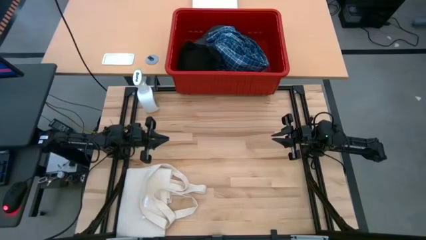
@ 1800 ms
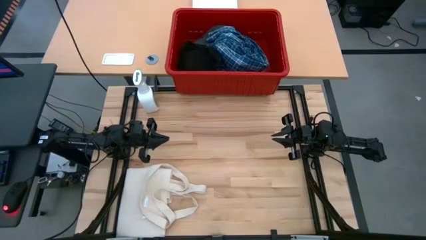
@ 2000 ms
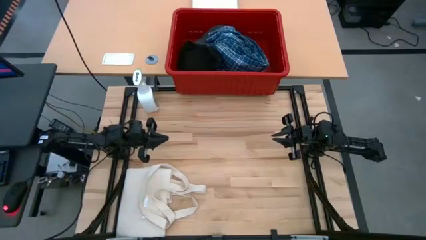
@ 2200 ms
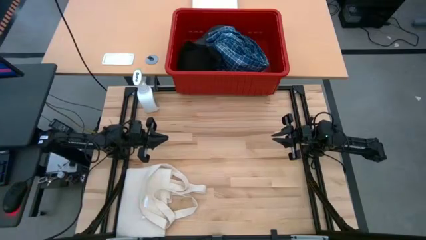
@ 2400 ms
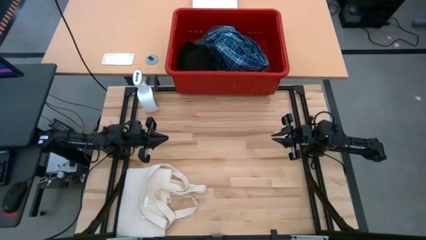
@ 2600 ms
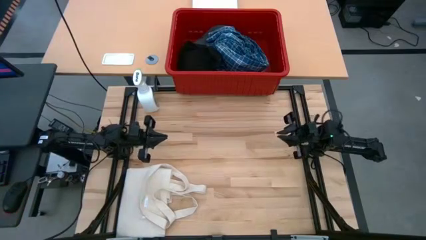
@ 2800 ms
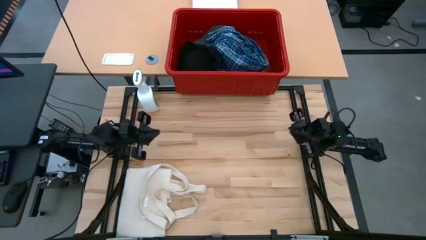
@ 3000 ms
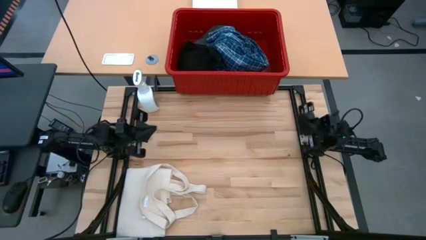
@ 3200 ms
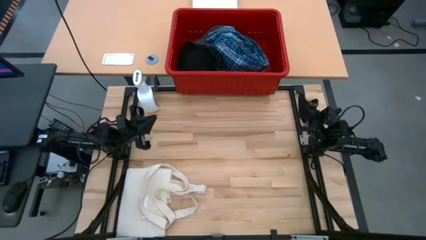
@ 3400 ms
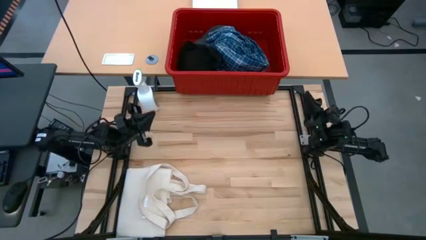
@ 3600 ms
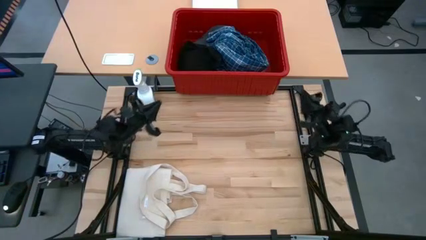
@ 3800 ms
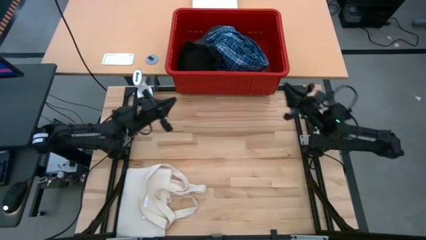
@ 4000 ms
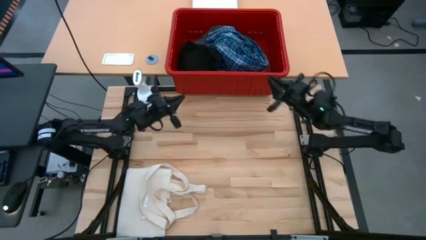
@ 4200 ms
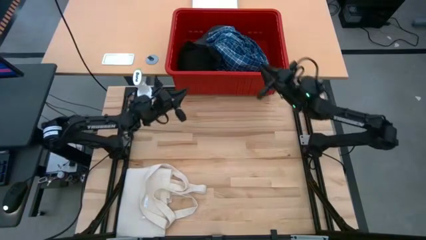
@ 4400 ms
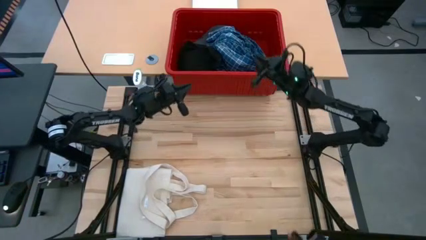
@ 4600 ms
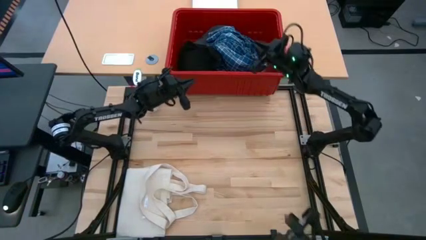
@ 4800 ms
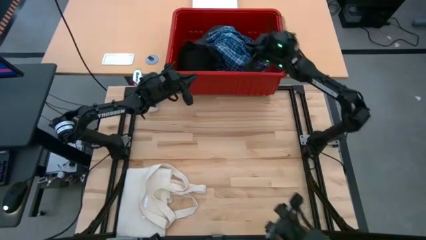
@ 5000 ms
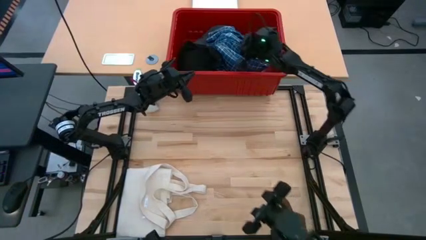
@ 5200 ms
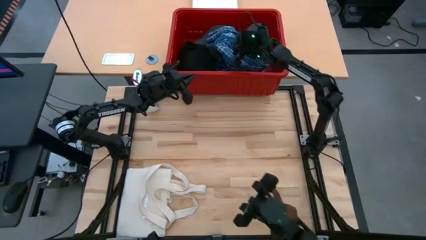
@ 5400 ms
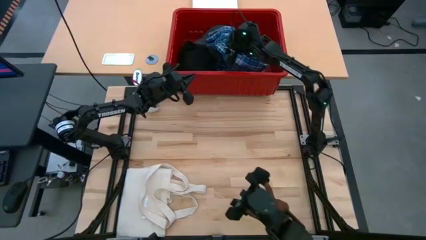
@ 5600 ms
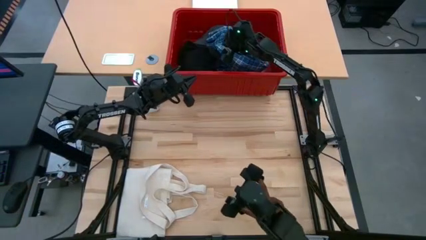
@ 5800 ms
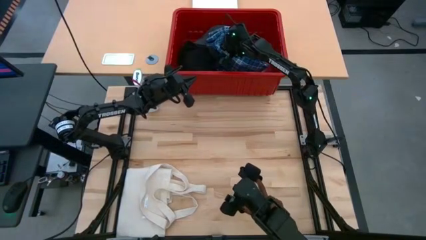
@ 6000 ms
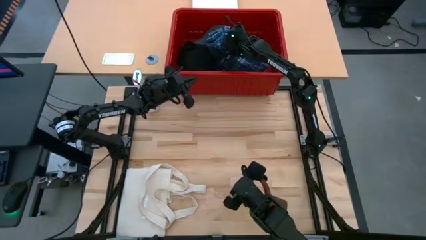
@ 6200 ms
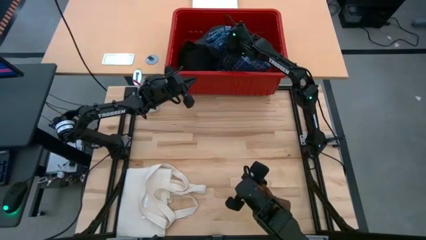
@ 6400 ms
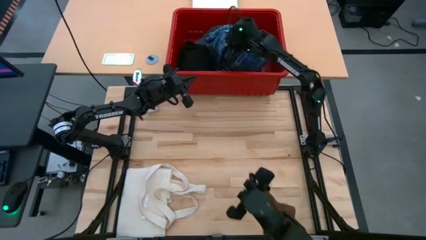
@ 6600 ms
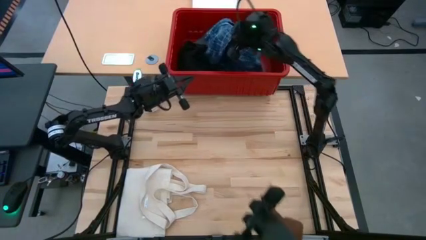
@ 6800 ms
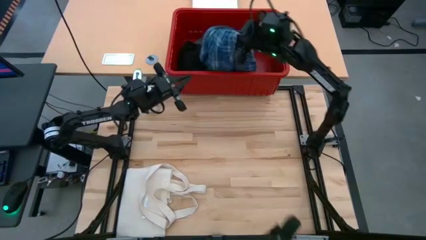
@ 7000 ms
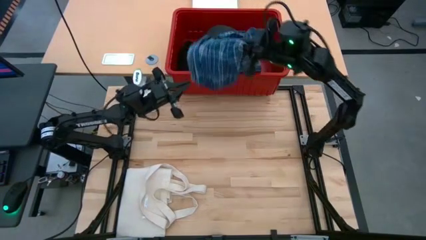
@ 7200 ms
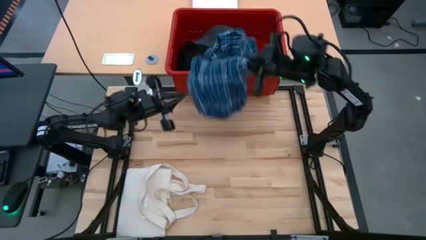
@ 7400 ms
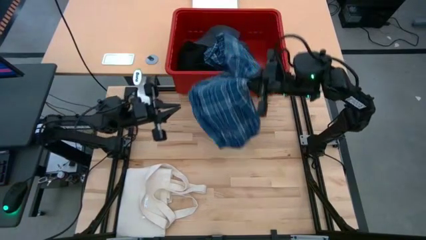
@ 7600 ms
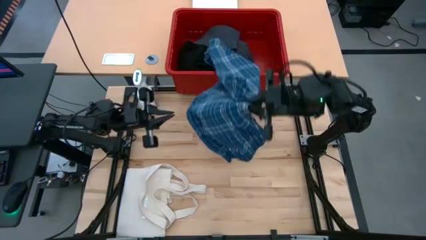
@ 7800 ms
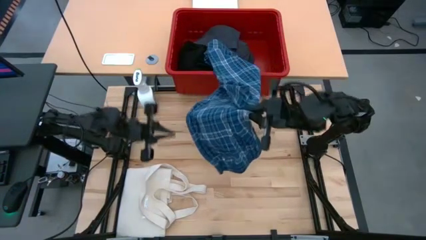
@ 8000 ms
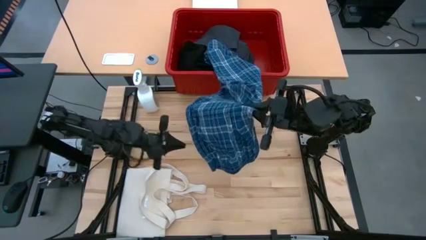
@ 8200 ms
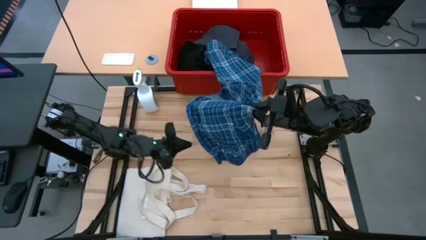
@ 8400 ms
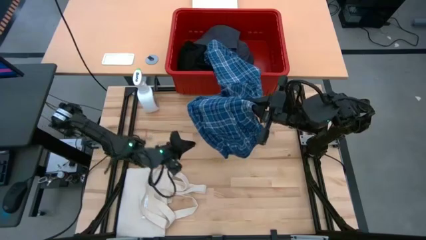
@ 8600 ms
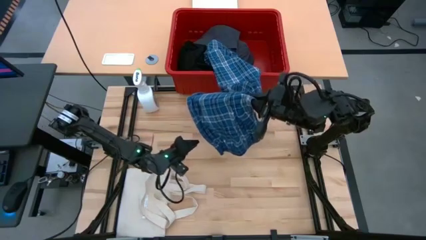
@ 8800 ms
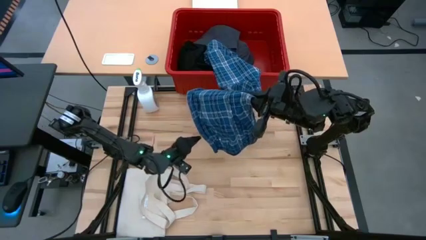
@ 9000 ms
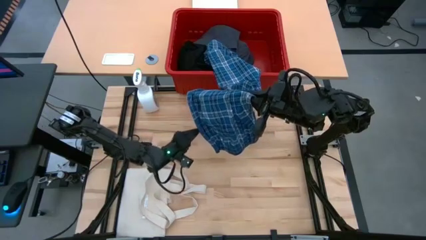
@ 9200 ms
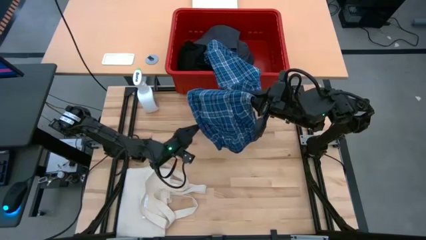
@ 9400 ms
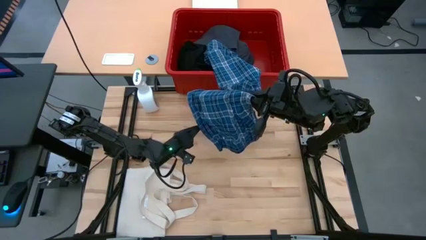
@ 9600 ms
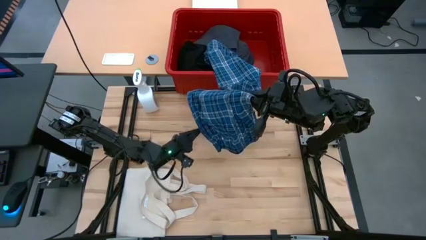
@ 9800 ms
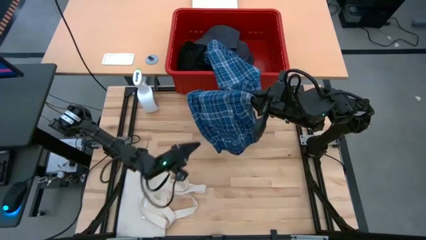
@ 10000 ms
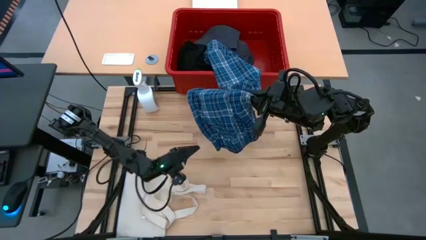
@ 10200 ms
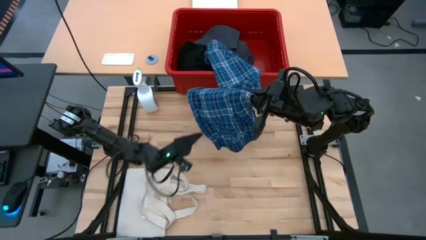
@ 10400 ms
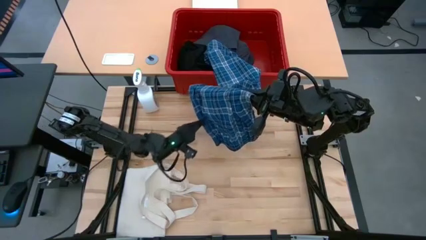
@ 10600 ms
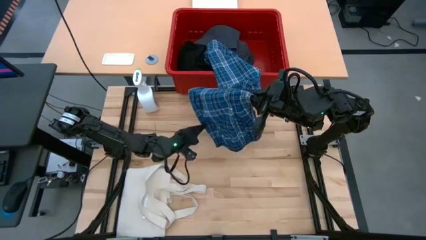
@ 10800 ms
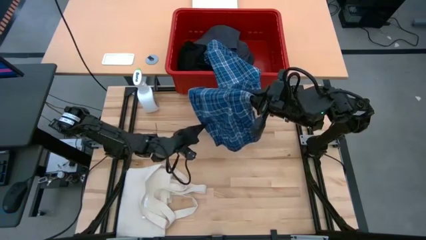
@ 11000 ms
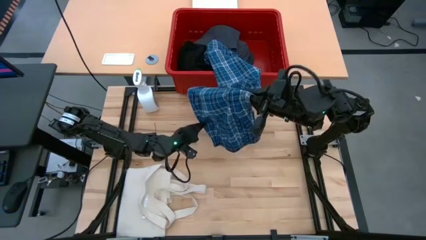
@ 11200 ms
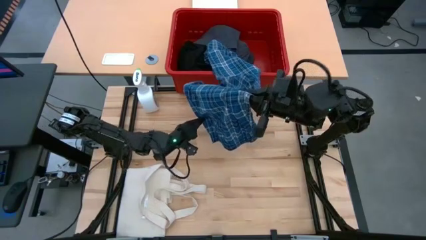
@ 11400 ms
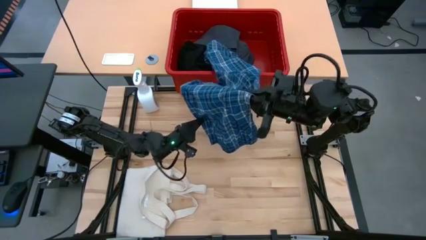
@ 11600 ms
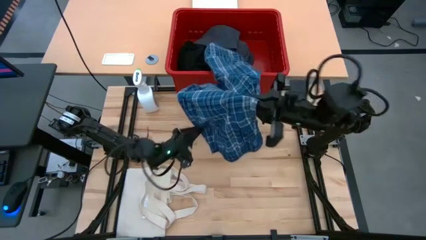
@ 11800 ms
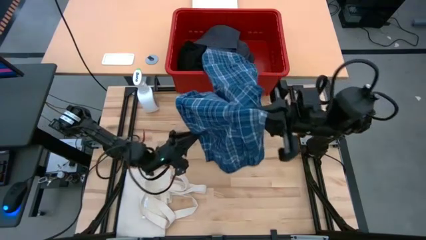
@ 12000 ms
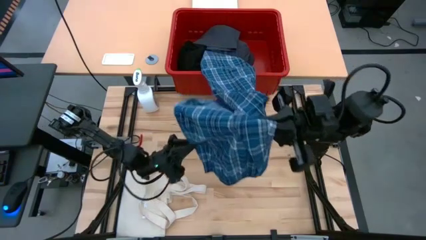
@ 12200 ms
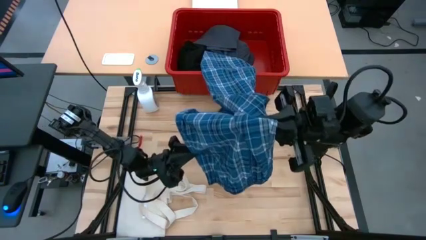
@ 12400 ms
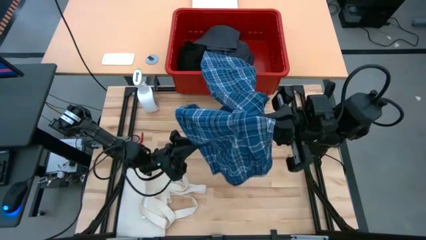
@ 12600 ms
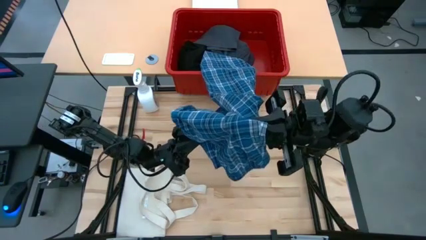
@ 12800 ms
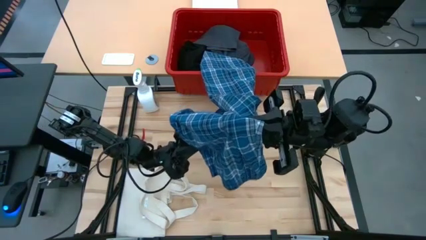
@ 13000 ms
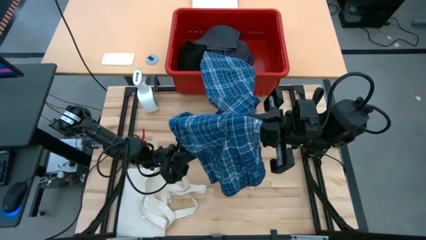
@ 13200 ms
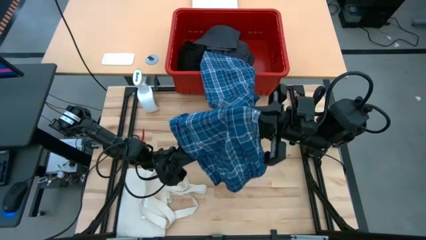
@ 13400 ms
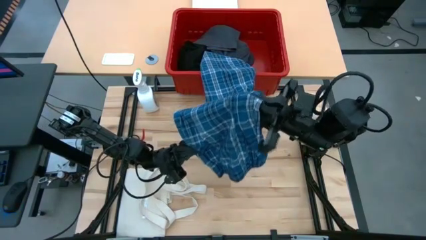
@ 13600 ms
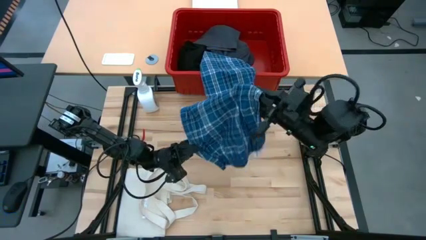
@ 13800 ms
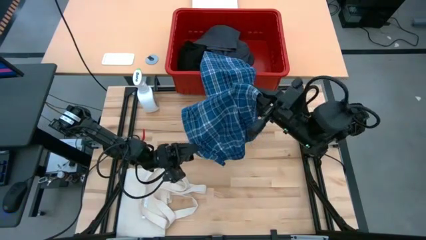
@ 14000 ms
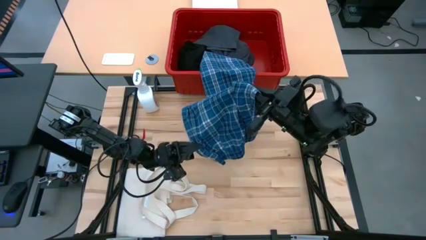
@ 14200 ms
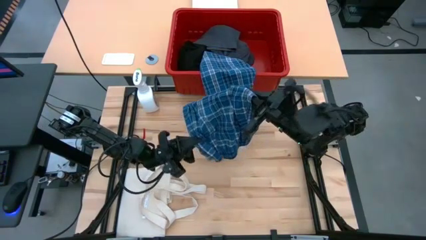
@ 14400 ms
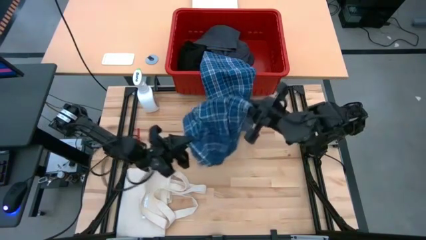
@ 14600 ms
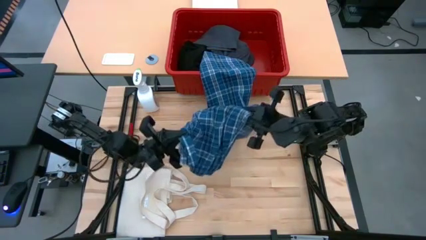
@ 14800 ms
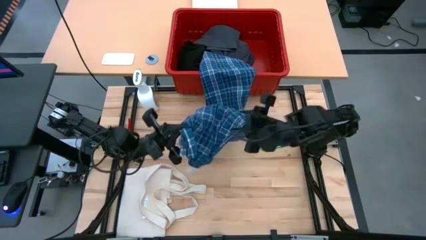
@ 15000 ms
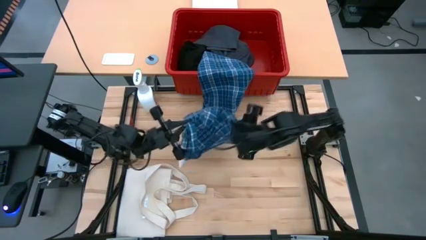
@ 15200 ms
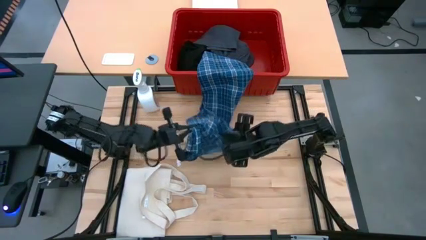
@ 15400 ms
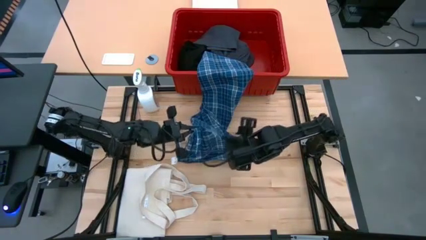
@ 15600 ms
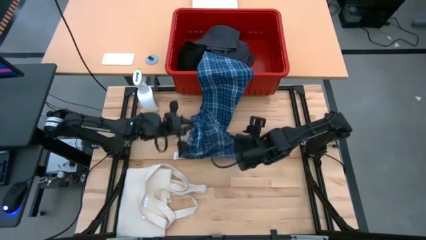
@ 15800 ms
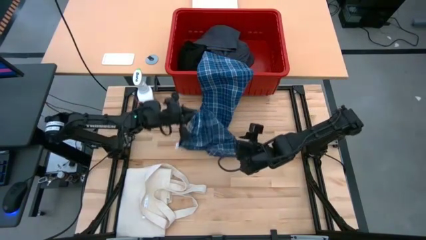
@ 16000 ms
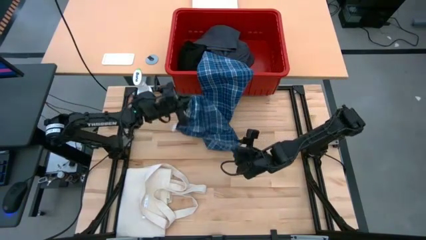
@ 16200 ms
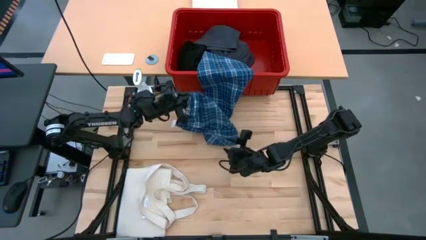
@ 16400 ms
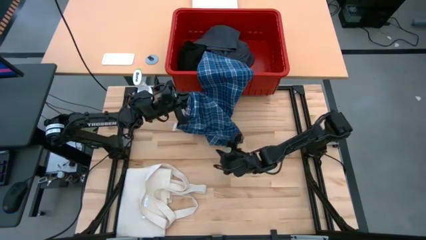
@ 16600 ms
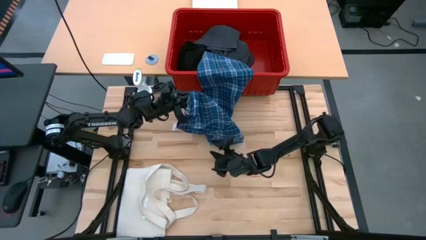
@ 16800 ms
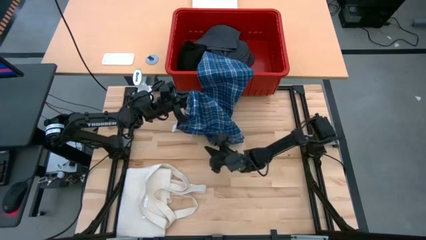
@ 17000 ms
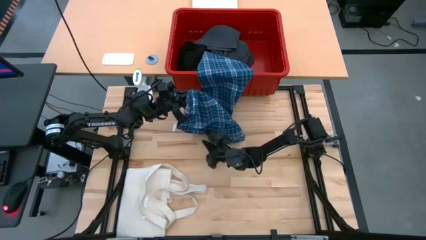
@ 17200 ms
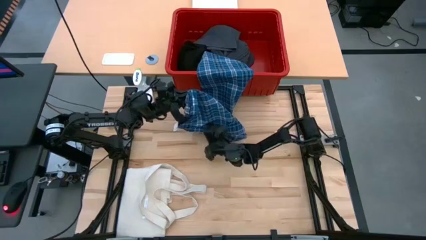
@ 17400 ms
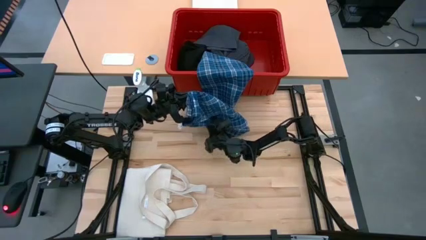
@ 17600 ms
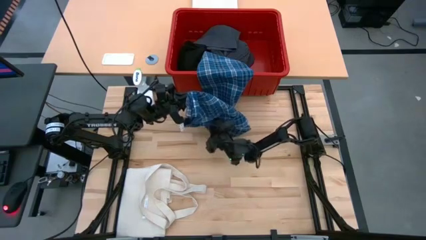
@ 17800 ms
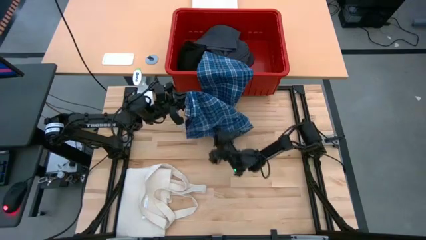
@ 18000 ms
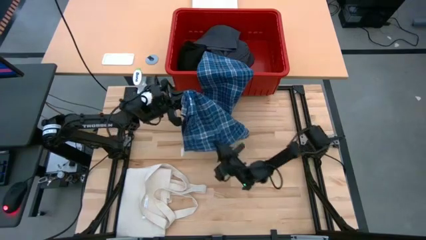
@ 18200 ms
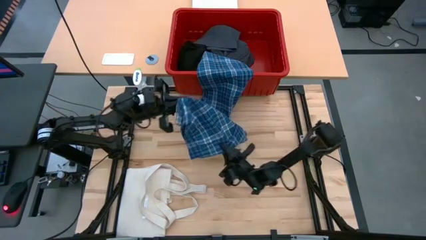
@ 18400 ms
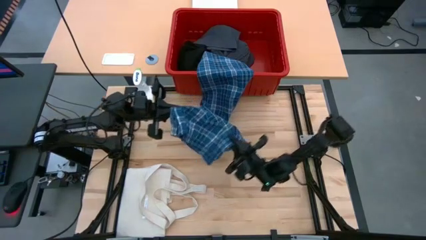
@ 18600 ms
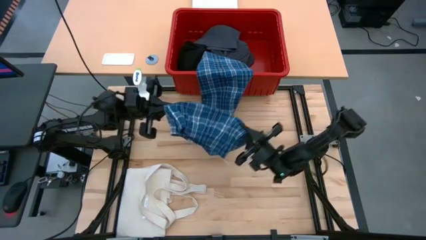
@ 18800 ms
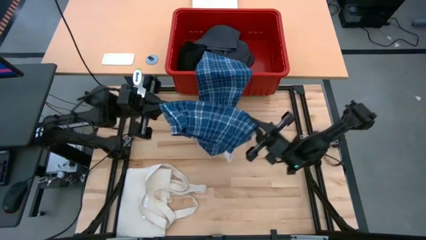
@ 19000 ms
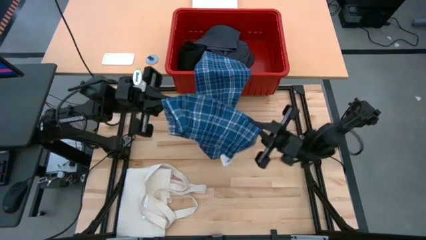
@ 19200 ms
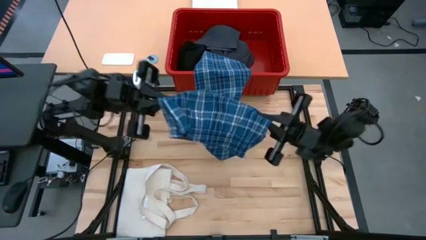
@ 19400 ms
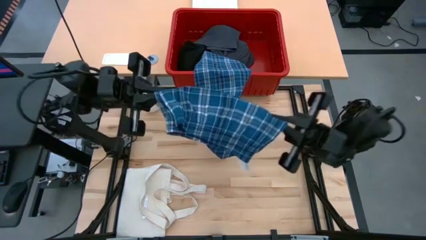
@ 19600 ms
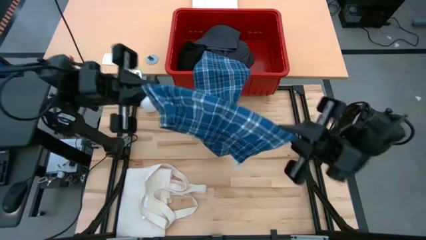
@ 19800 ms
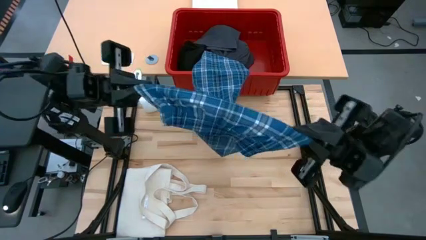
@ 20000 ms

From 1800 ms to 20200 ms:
Task: Fold Laundry from Bin
Fold the blue pants
